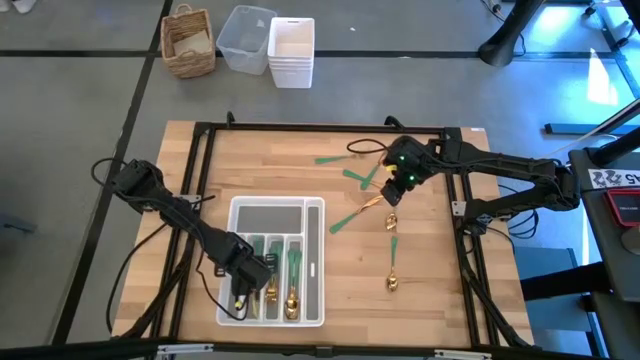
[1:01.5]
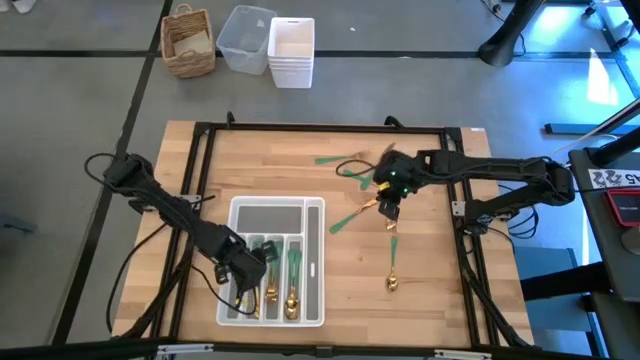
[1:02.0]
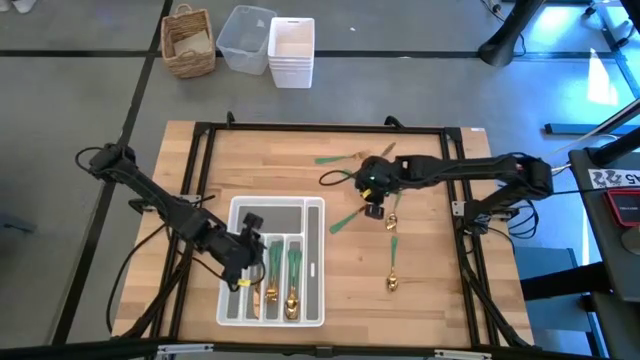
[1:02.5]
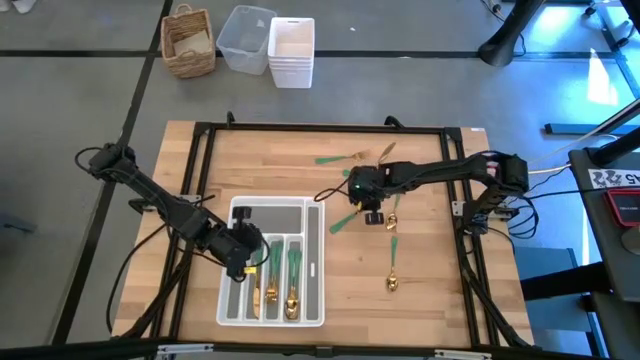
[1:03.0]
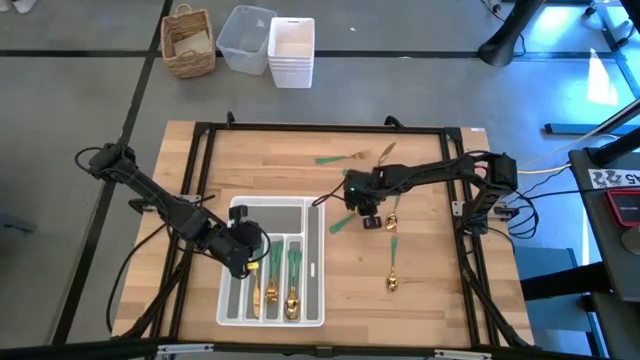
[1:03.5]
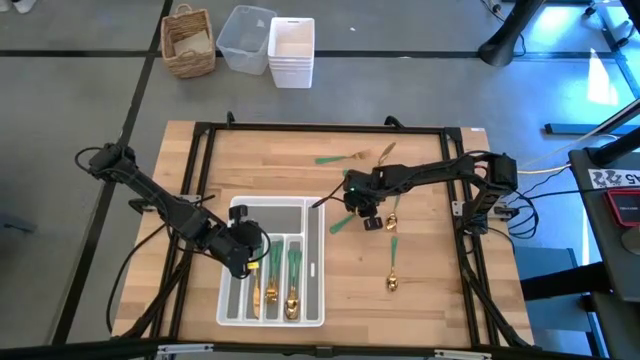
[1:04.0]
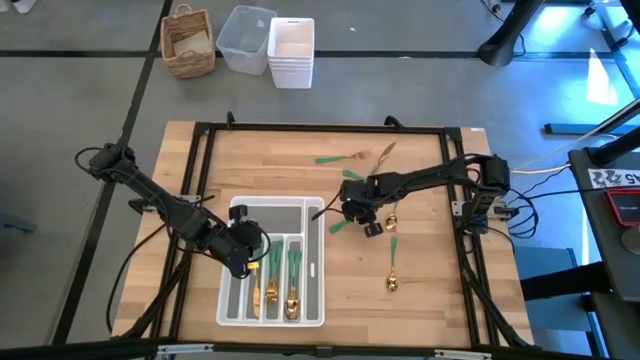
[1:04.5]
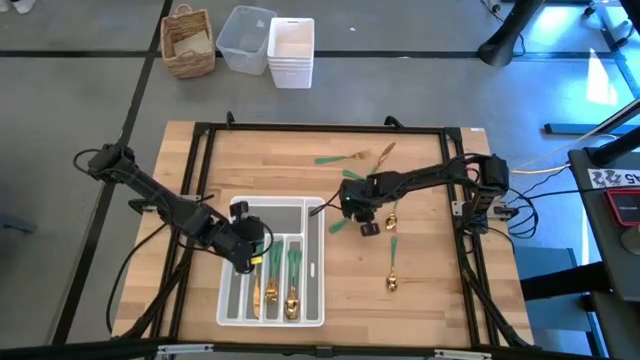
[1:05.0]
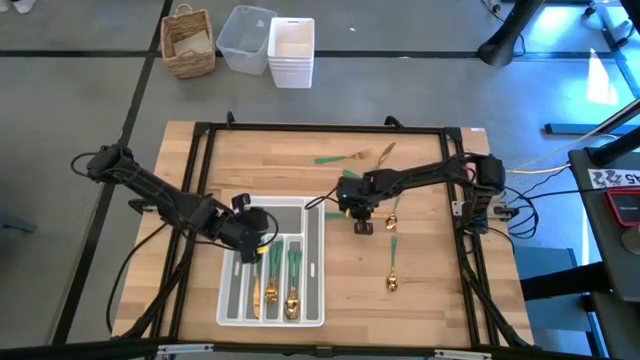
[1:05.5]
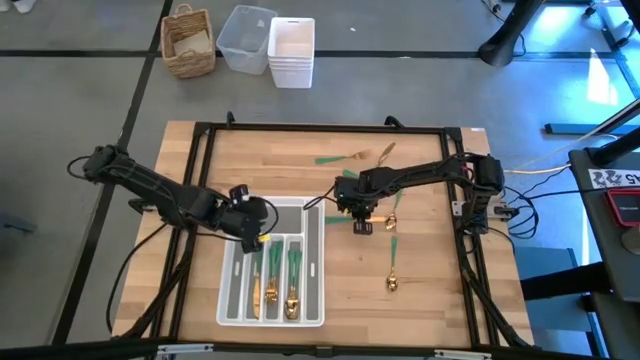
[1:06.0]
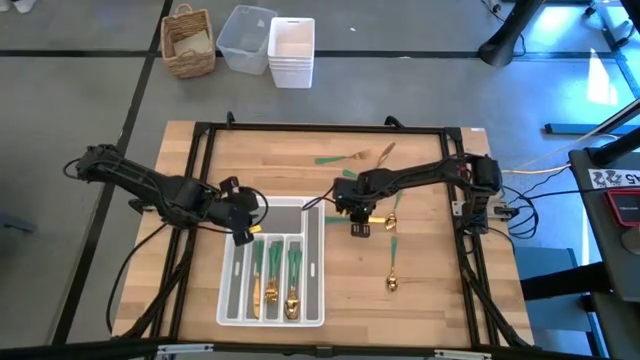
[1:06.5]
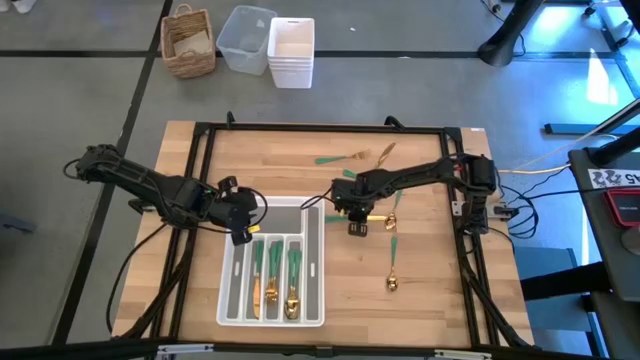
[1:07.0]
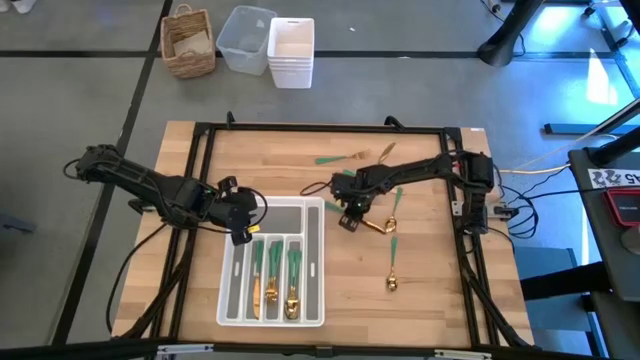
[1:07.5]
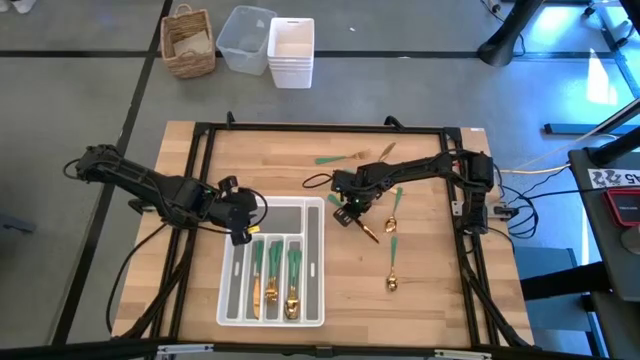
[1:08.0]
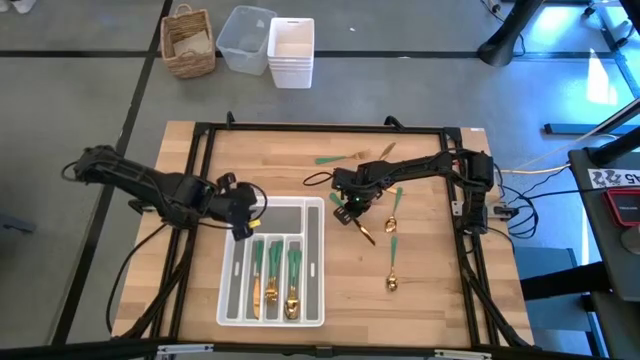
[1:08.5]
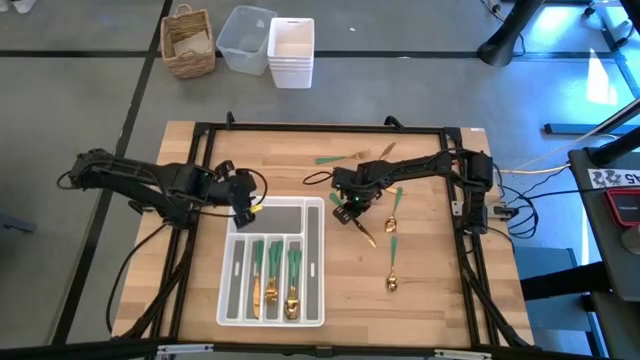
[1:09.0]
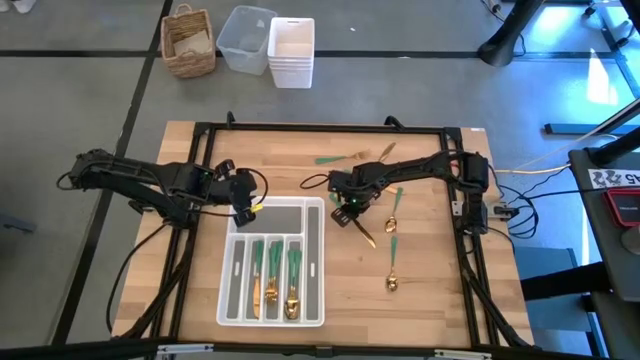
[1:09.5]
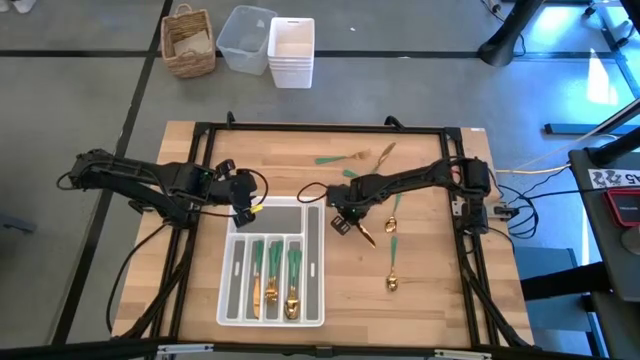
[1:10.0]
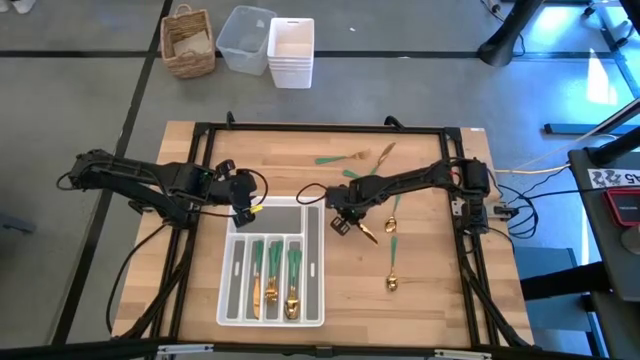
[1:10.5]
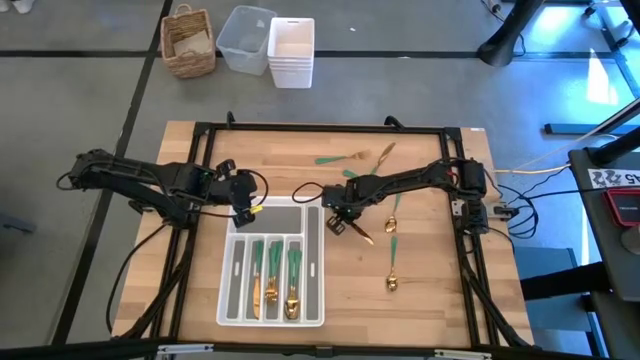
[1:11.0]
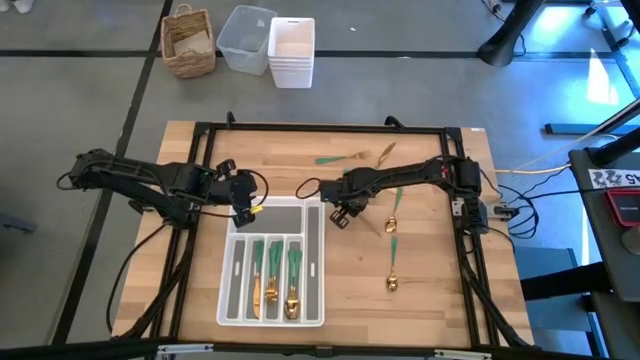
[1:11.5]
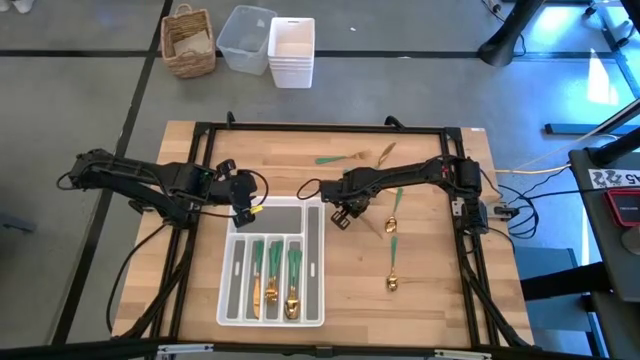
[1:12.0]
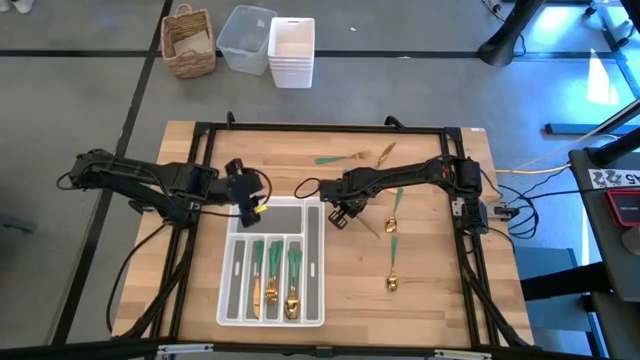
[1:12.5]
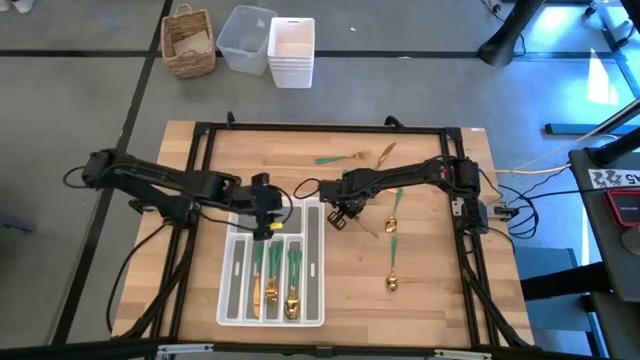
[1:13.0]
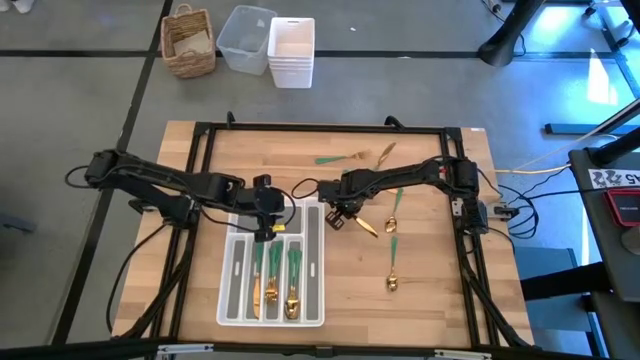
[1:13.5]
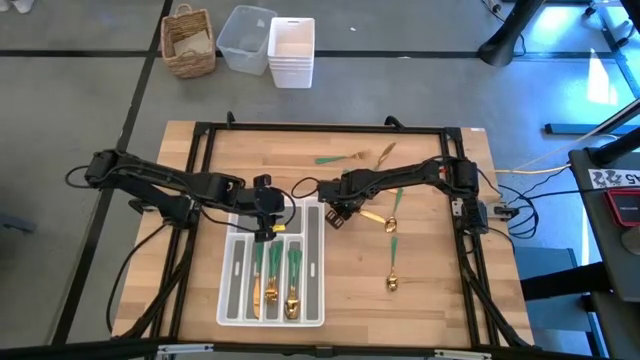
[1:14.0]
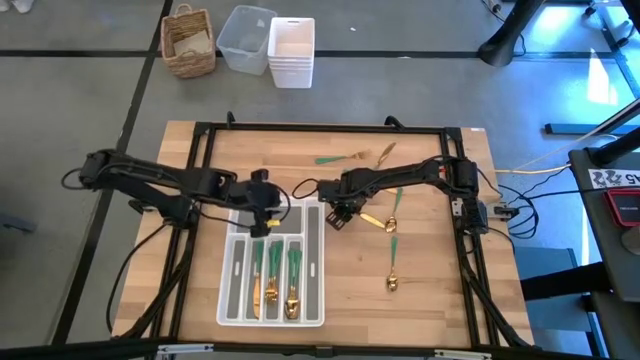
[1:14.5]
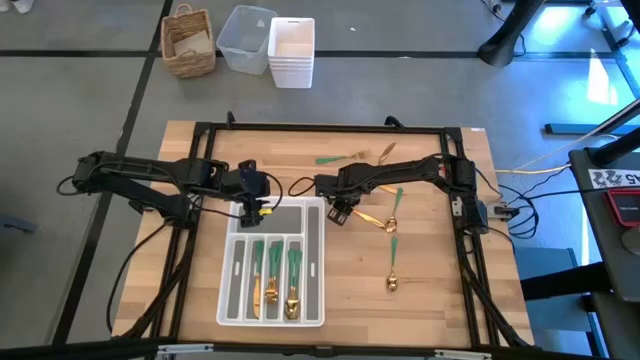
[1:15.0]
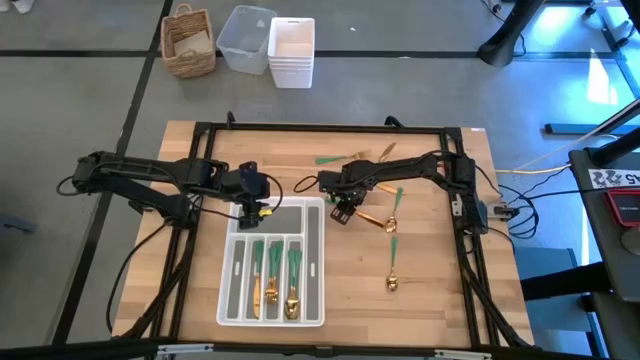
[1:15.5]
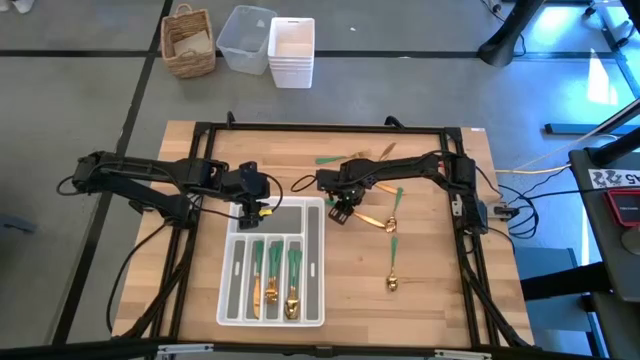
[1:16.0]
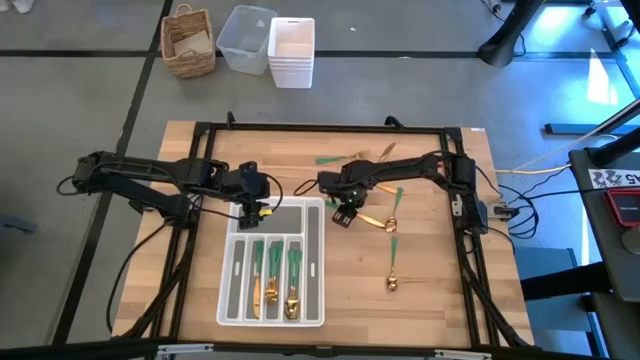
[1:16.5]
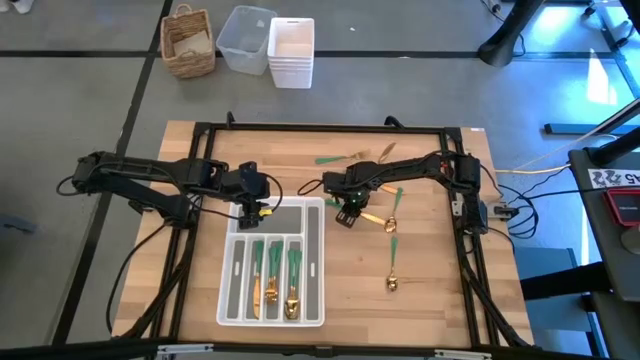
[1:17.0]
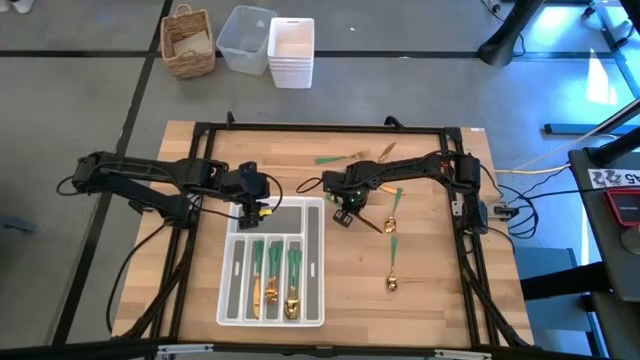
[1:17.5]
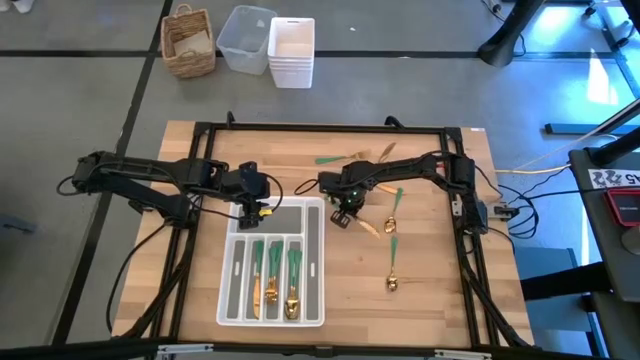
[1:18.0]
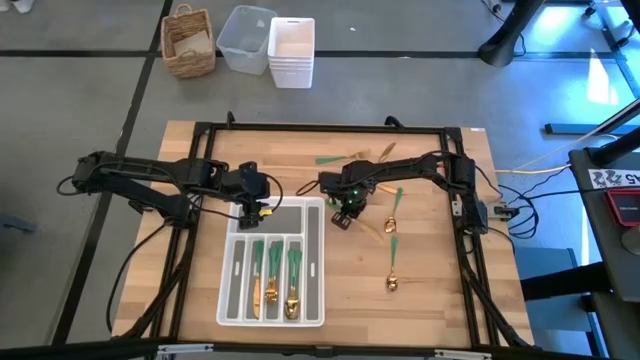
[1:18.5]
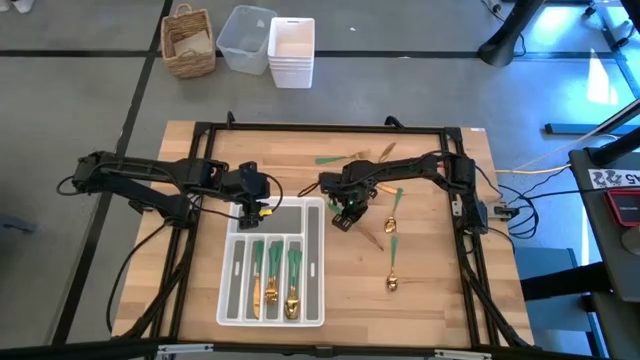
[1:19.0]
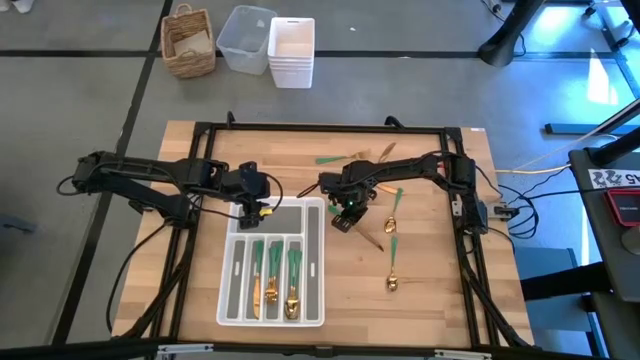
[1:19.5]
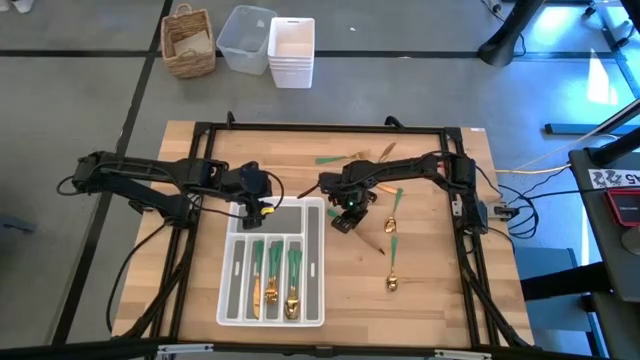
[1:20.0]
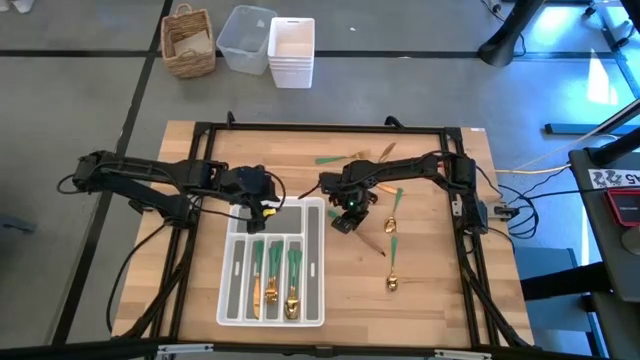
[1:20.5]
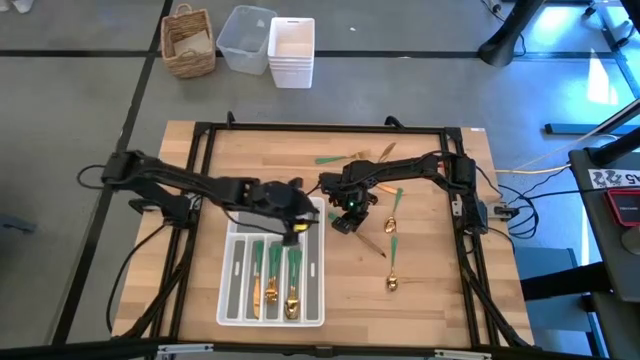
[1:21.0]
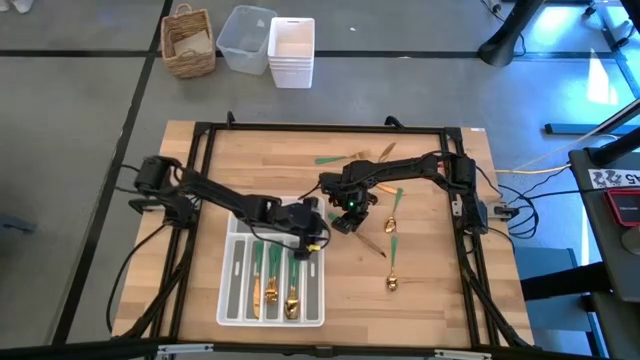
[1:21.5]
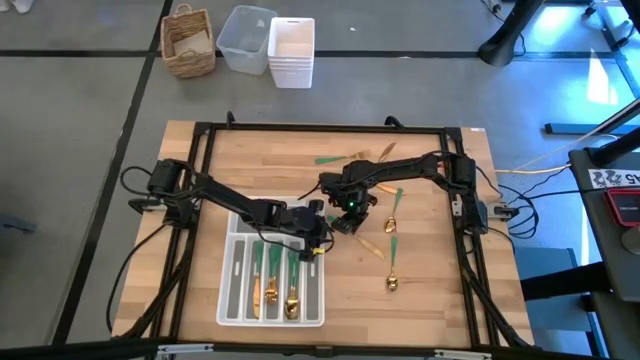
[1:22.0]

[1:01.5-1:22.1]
Task: Sort silverware
Put the knife in the silverware tray

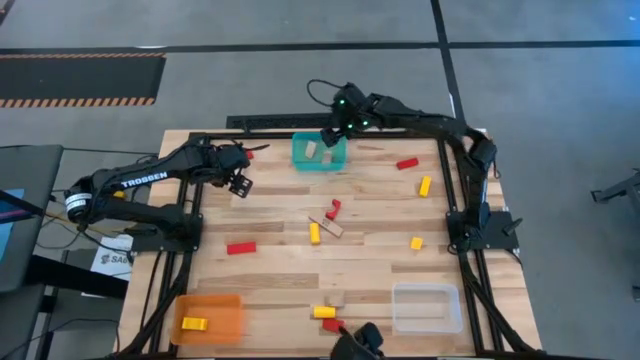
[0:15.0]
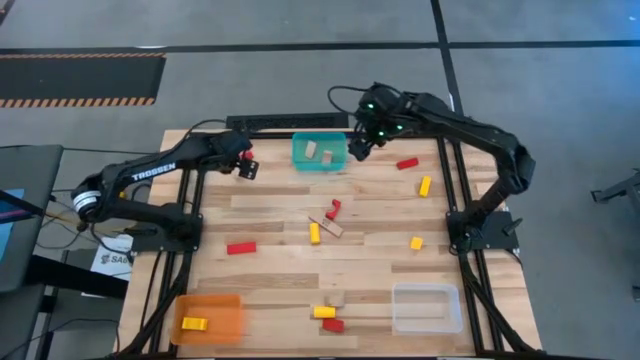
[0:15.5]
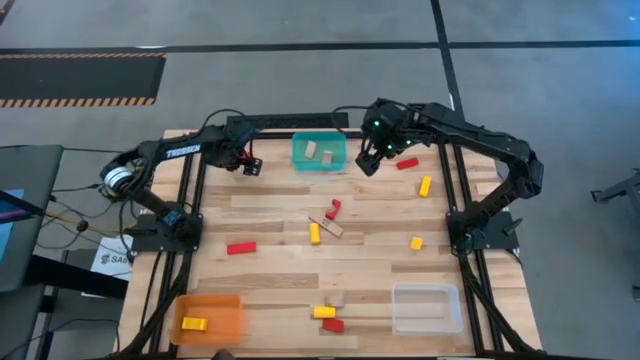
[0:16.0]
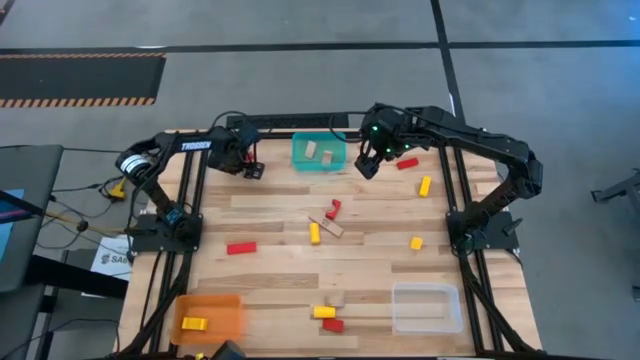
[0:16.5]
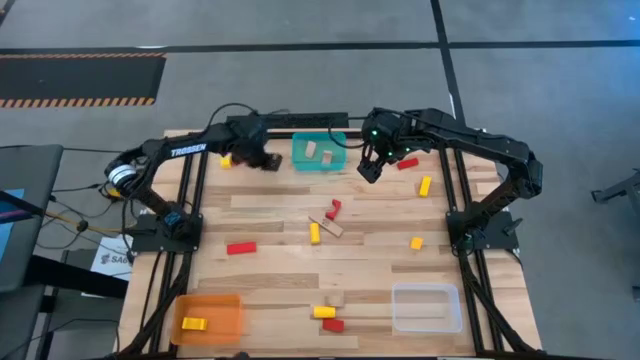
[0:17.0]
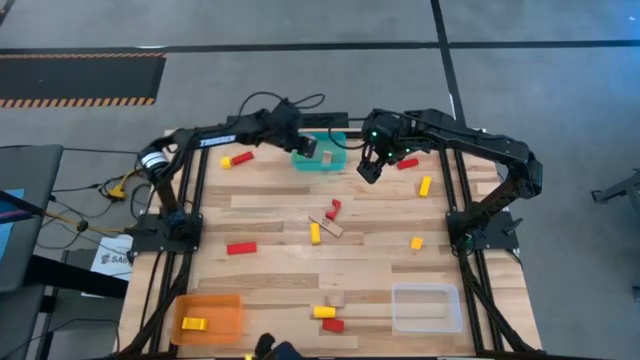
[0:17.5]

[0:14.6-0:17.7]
Task: Sort & place blocks by color
Put the light brown block into the blue bin
